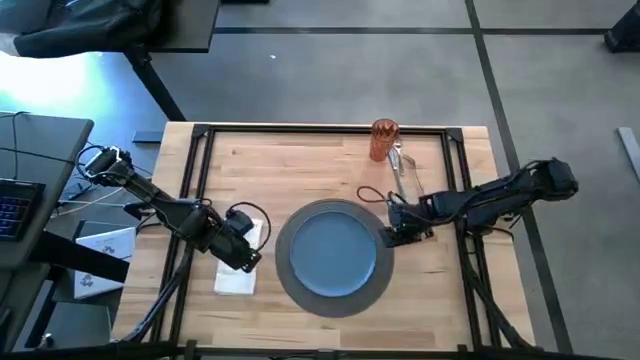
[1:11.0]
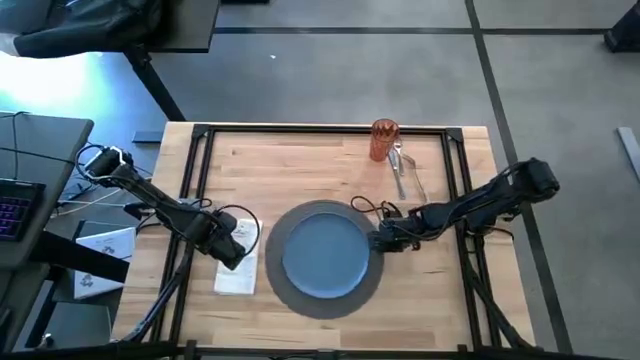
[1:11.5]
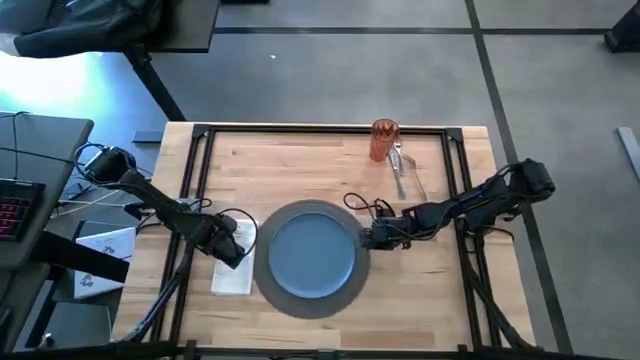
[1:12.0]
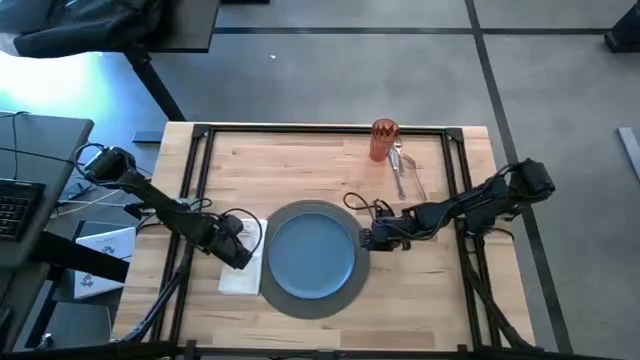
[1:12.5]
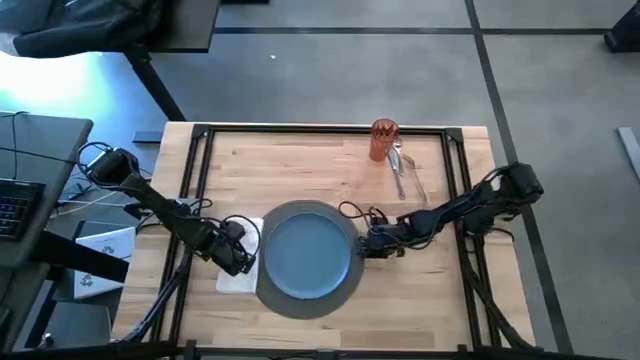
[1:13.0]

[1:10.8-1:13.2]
Task: Set table place
Put the white table napkin to the left side of the blue plate

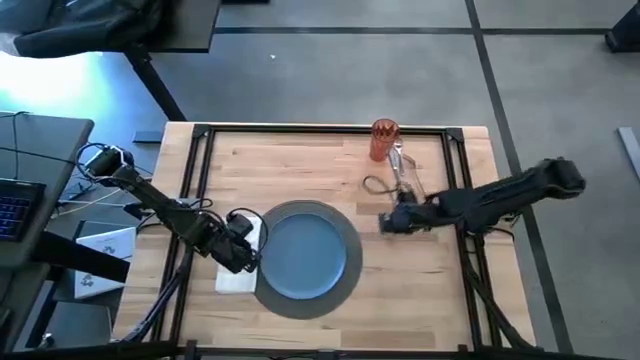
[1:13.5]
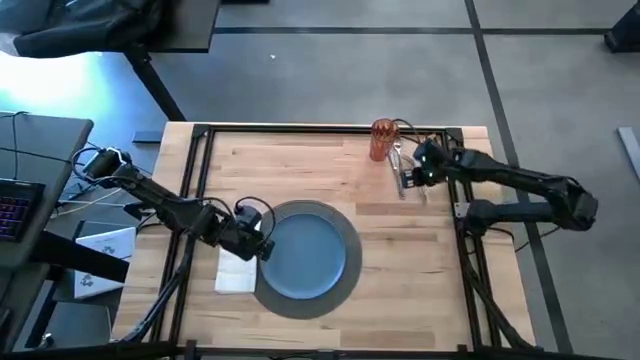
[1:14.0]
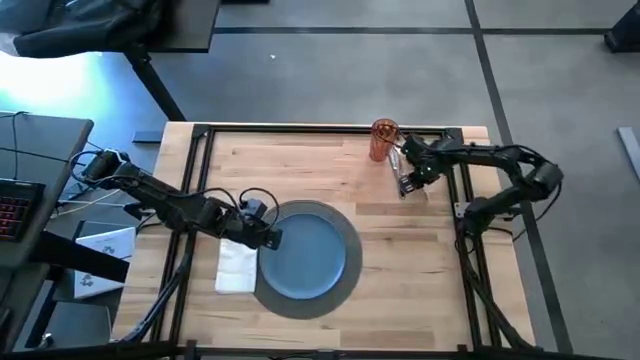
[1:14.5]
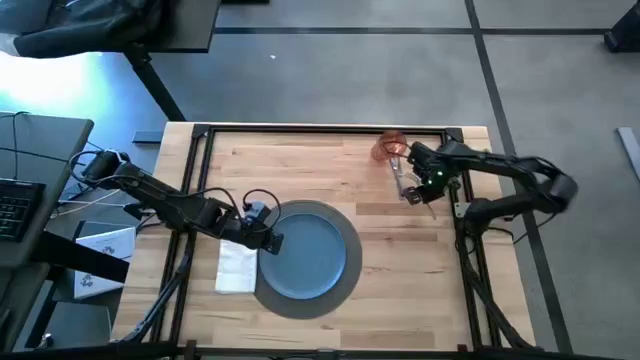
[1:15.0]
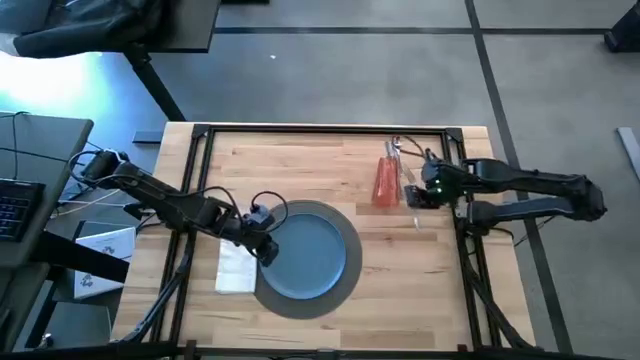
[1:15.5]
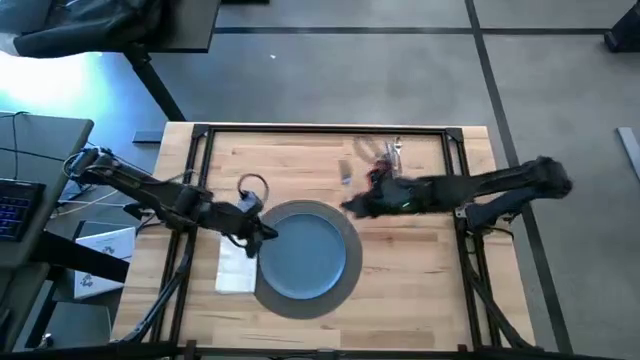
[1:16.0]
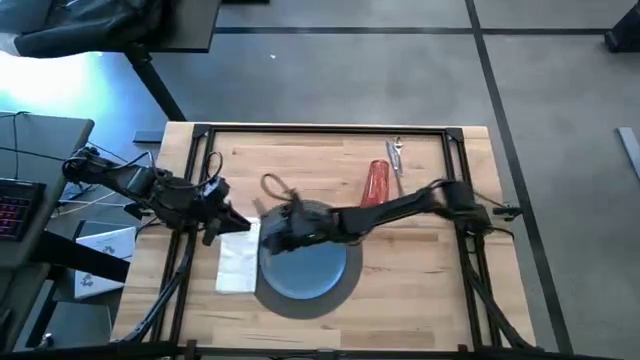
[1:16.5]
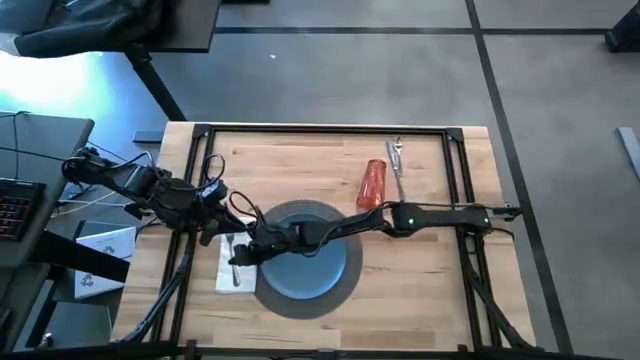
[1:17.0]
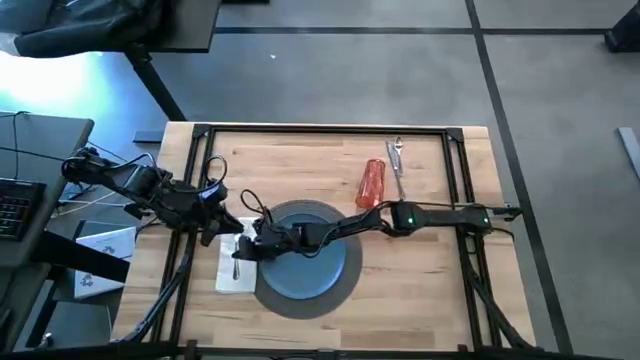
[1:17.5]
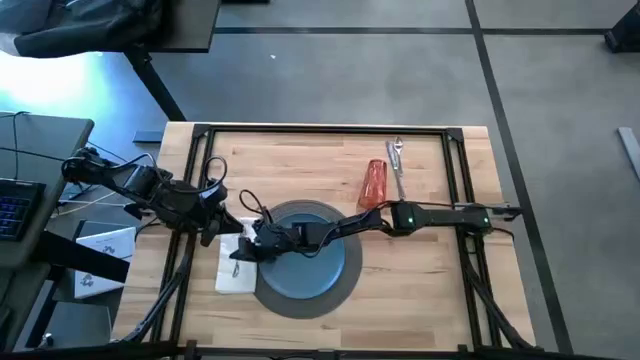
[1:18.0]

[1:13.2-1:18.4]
Put the fork on the white table napkin

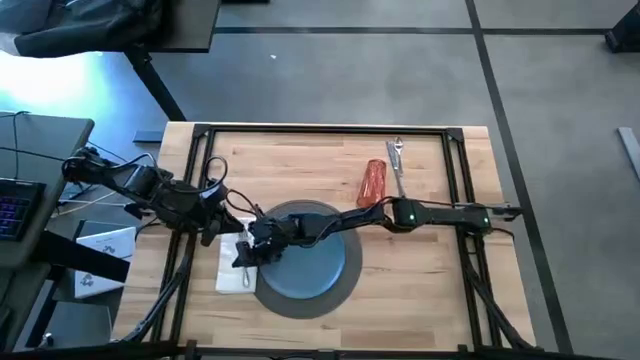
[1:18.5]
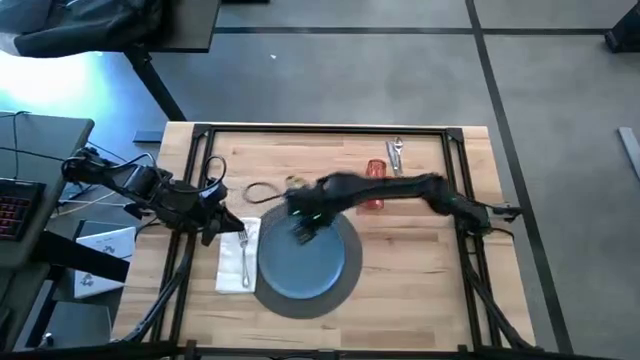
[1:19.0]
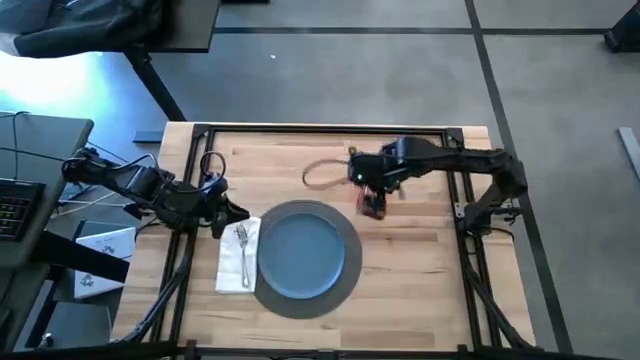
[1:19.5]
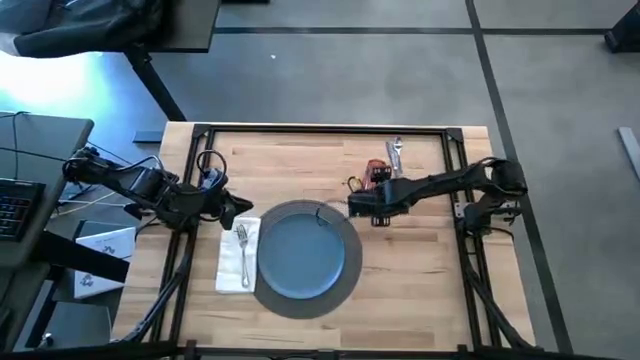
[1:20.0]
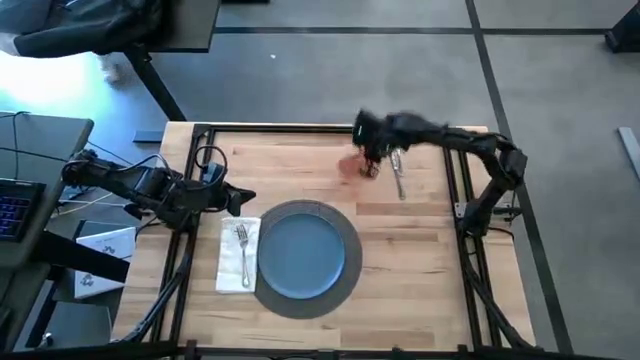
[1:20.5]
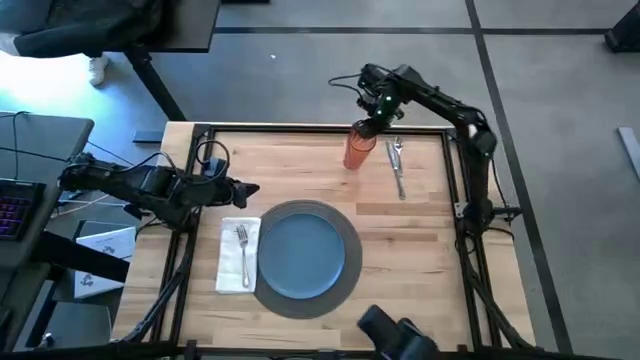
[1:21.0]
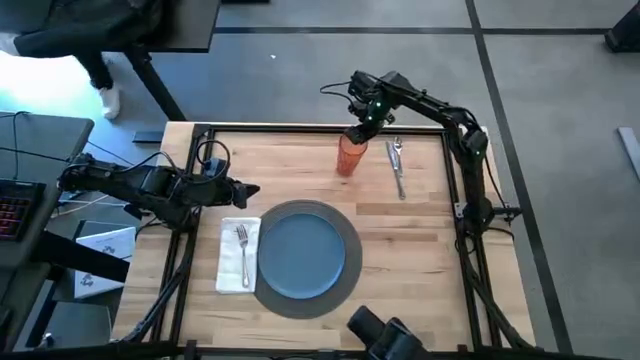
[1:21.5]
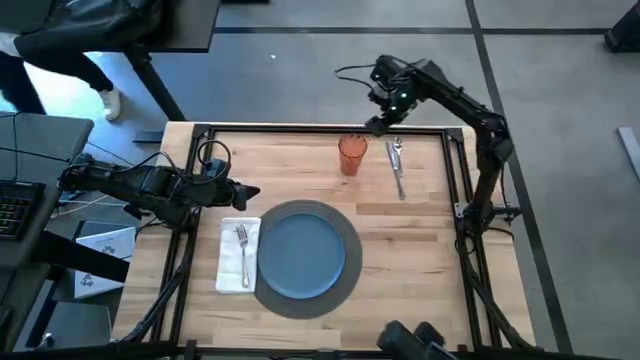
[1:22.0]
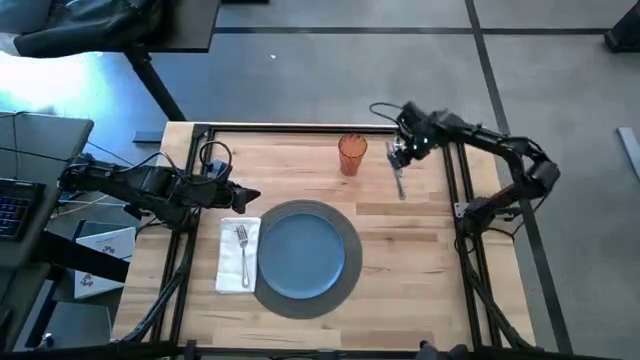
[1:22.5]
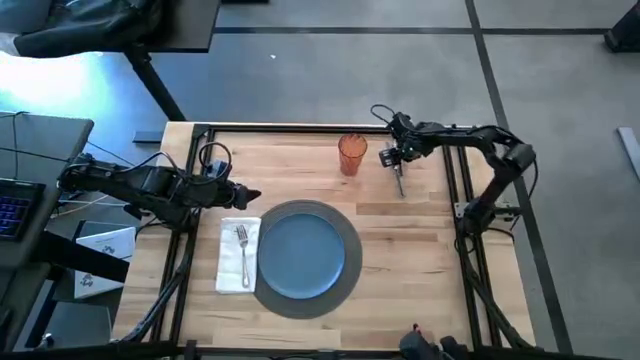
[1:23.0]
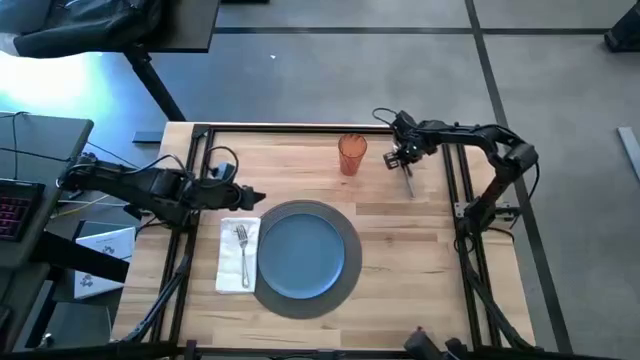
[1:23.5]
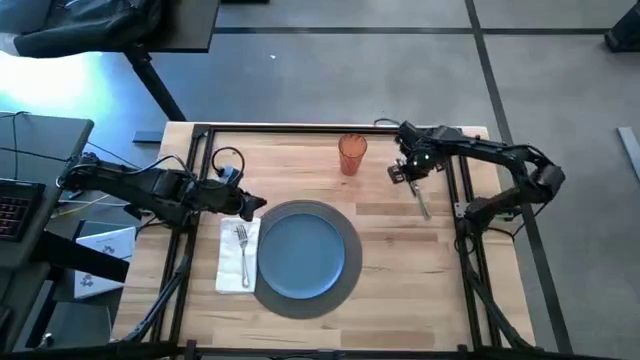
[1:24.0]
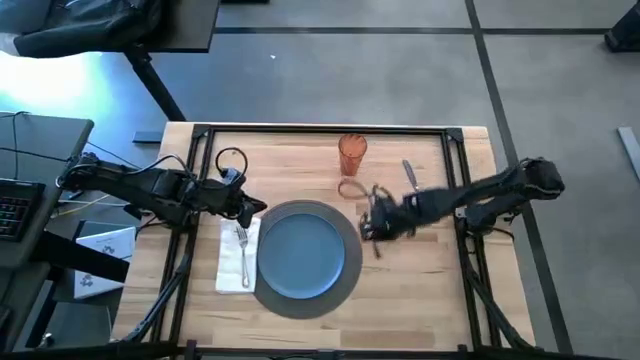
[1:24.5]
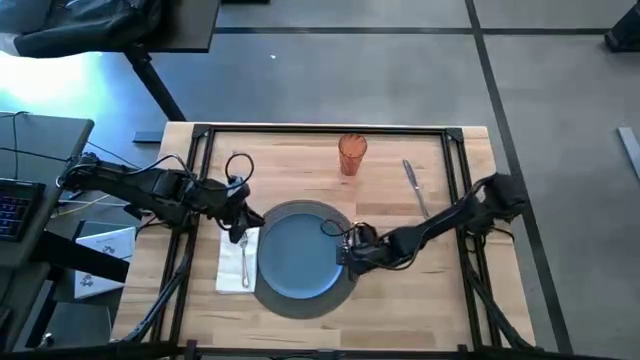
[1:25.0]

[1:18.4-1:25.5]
Put the cup on the table mat

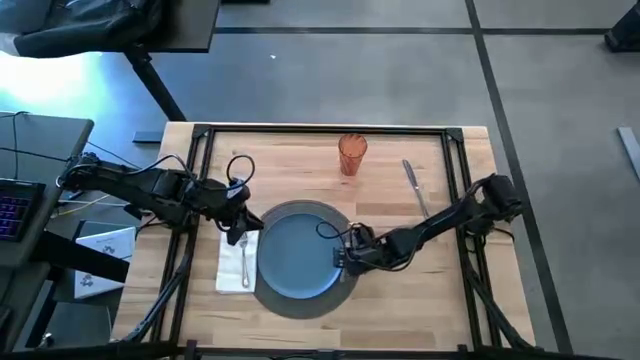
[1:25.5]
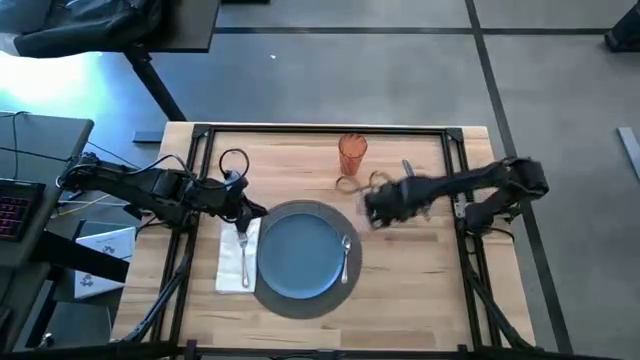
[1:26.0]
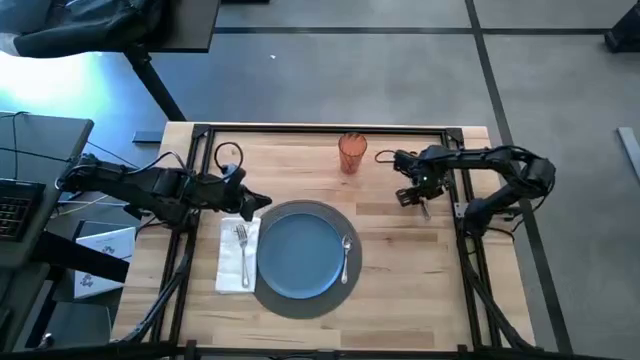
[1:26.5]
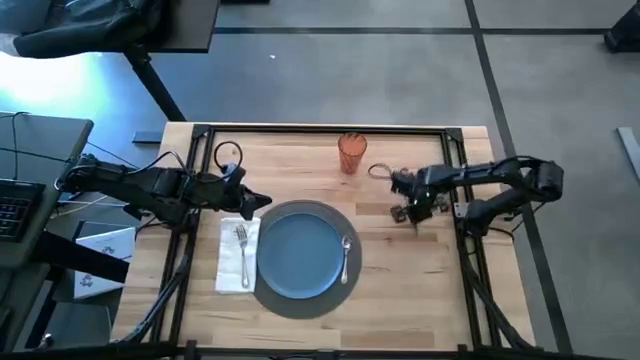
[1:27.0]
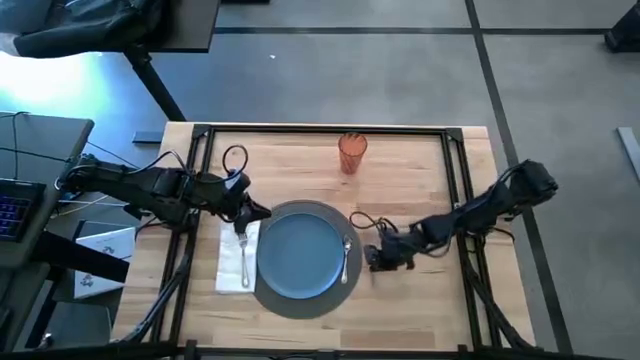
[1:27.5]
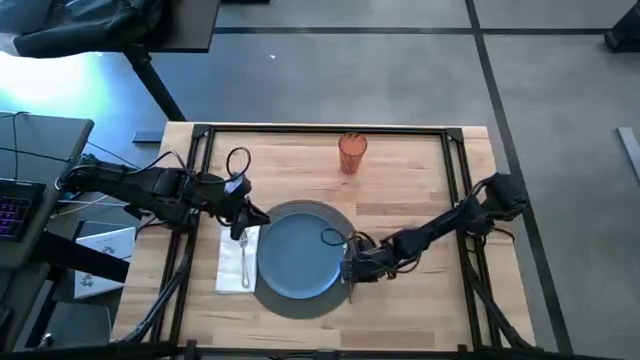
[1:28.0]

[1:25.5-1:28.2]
Put the spoon on the table mat

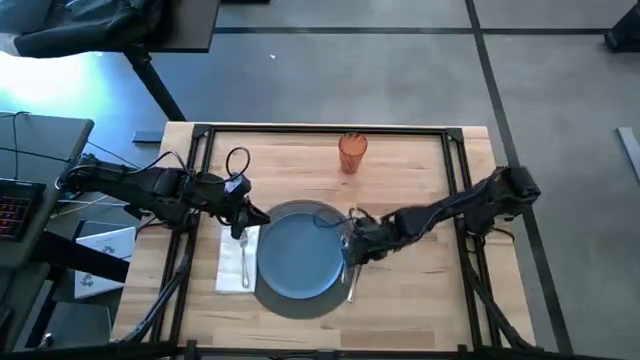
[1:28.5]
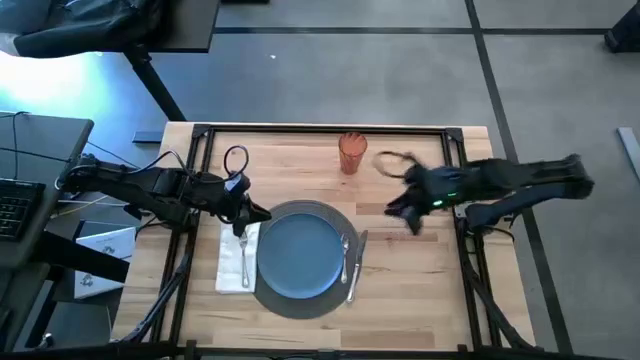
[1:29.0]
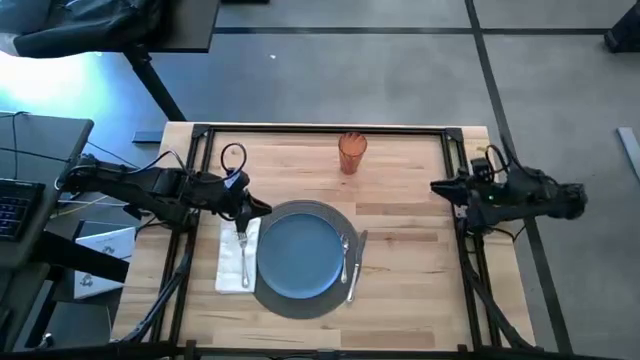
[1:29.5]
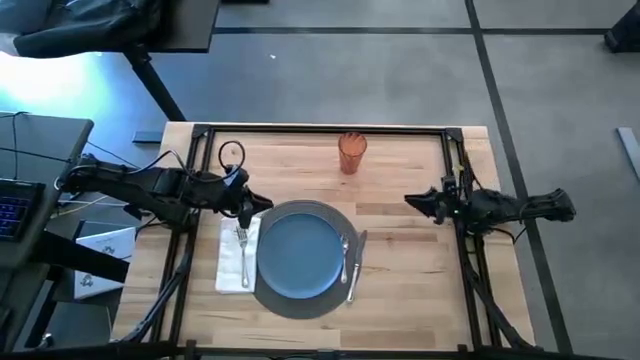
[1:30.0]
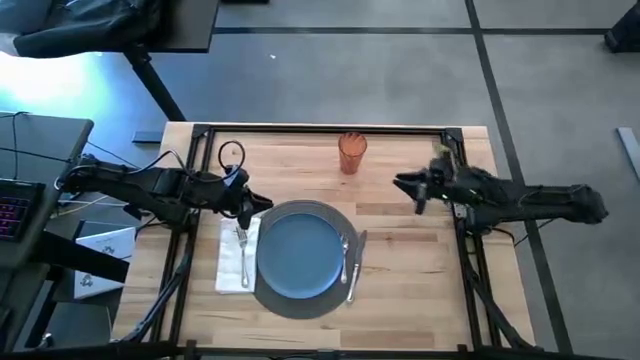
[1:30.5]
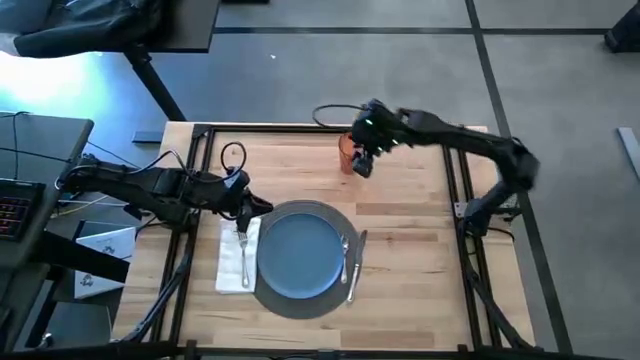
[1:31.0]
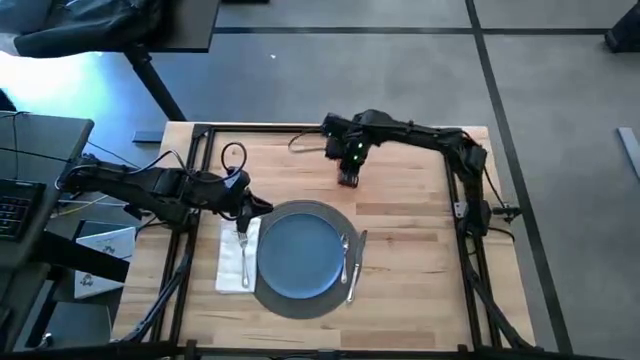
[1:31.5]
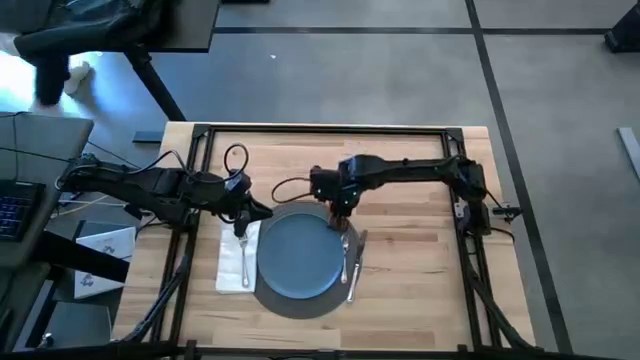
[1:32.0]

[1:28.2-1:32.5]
Put the table knife on the table mat
